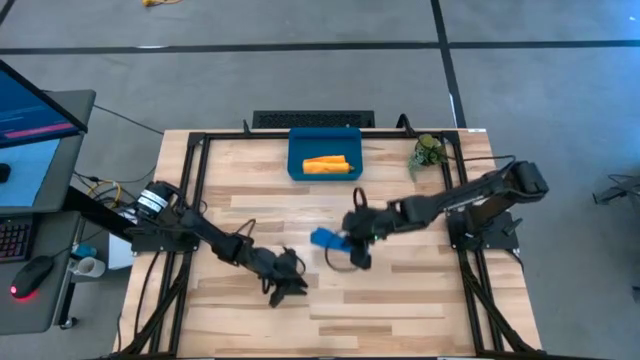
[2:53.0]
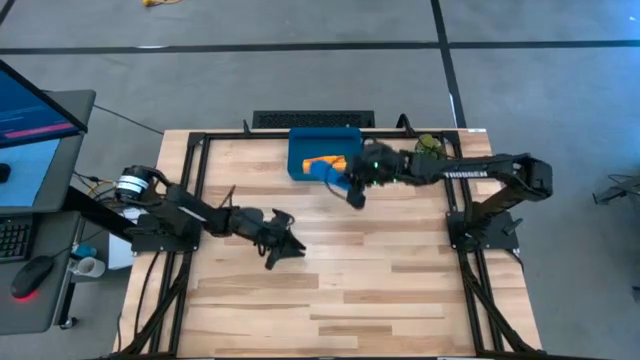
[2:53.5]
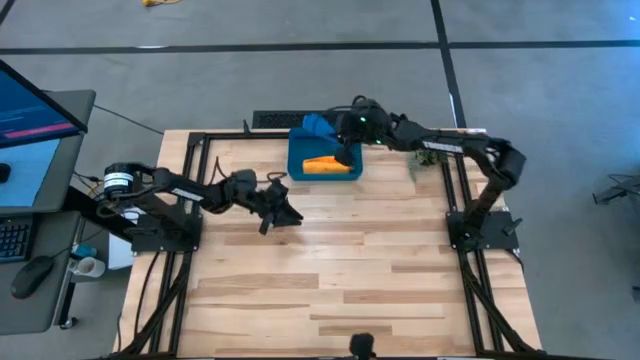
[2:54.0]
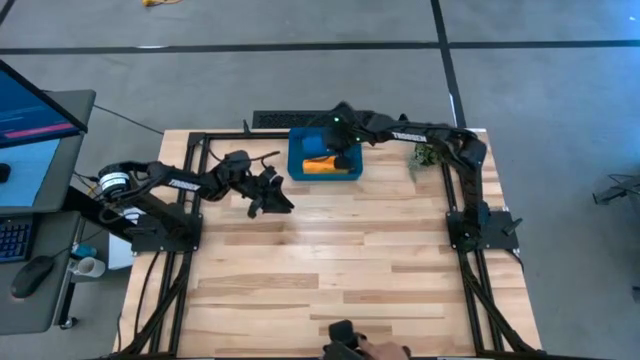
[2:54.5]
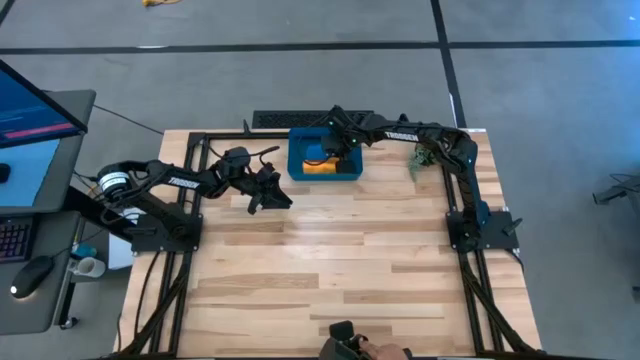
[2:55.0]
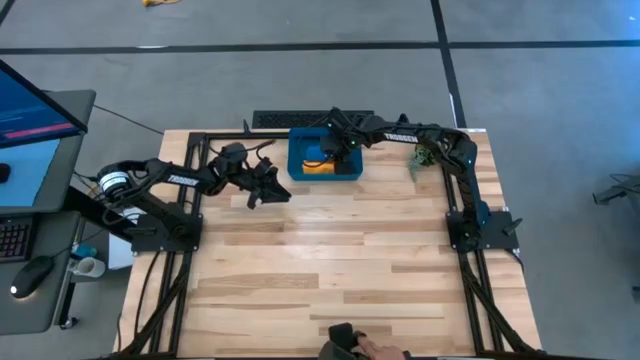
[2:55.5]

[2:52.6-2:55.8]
Task: Roll microfiber towels into tight, uniform cylinder then place into a basket
Put the blue microfiber cloth into the blue bin

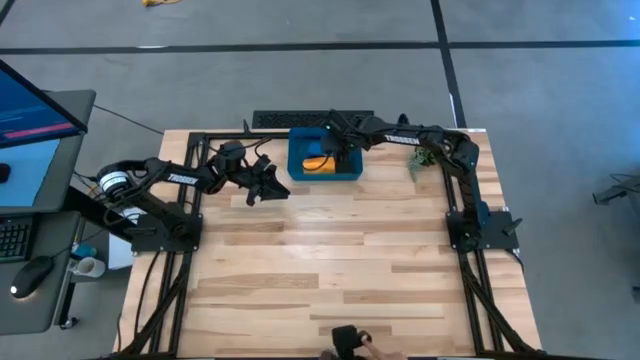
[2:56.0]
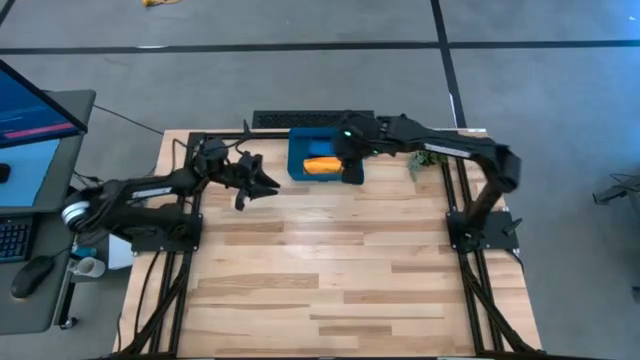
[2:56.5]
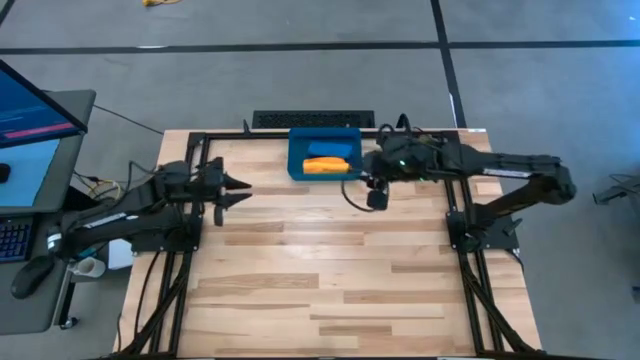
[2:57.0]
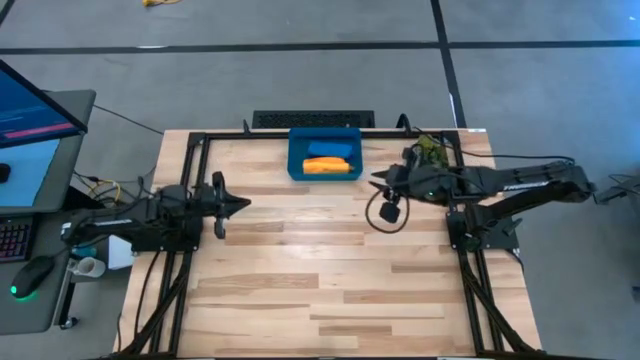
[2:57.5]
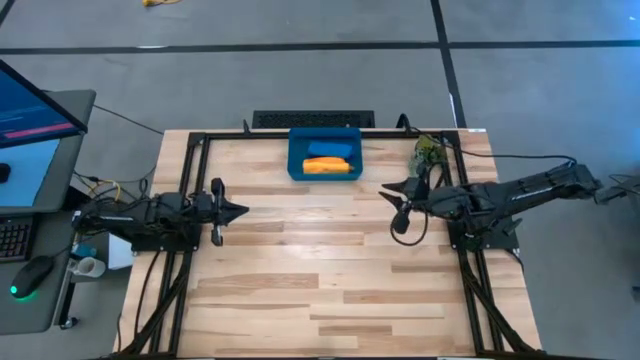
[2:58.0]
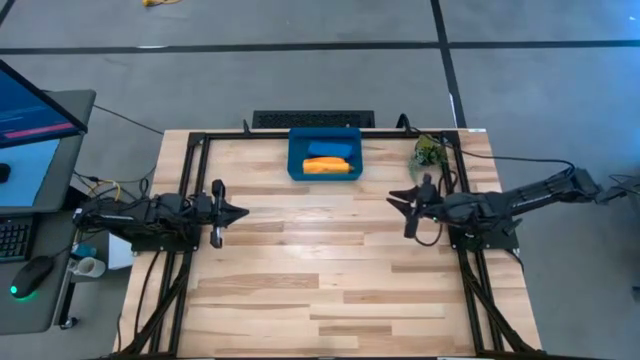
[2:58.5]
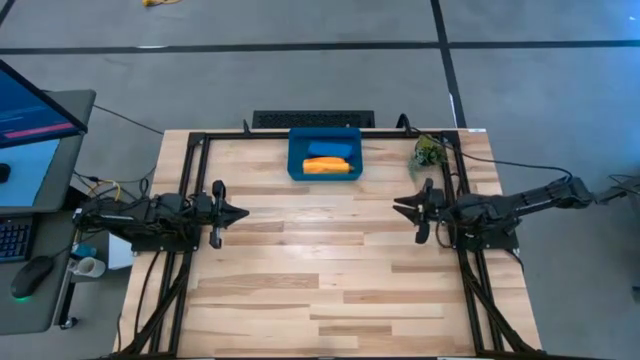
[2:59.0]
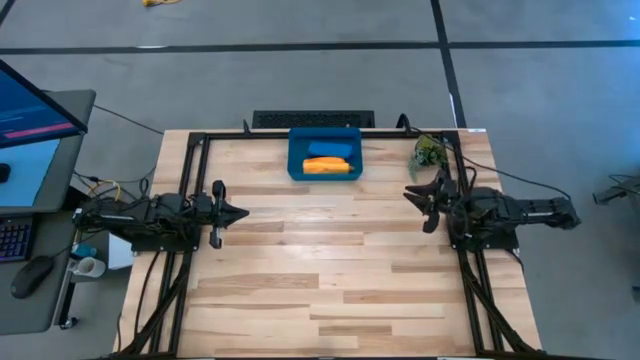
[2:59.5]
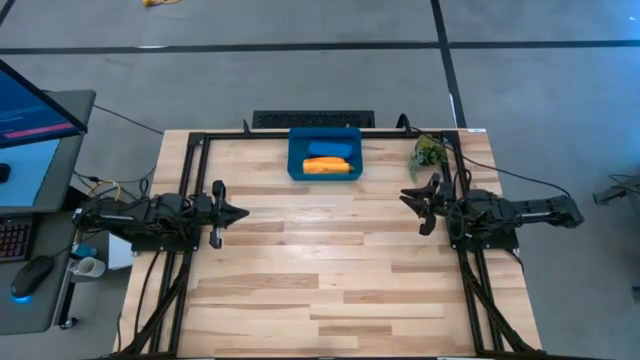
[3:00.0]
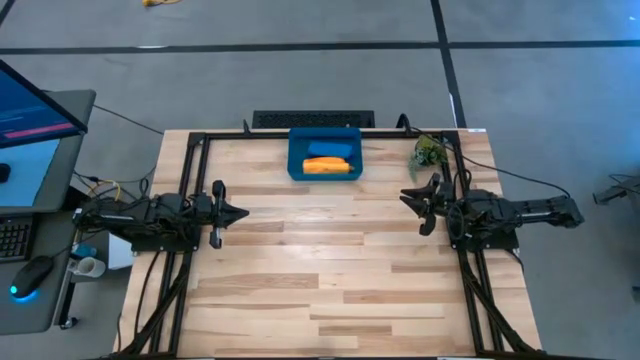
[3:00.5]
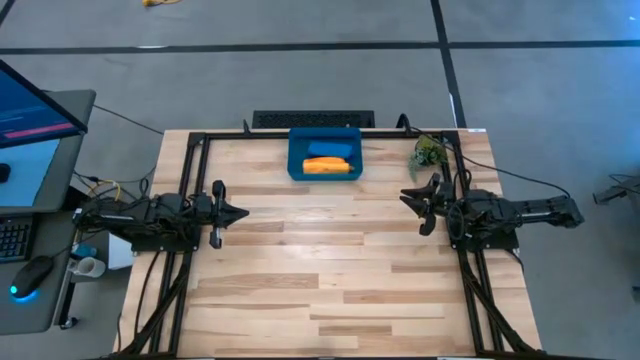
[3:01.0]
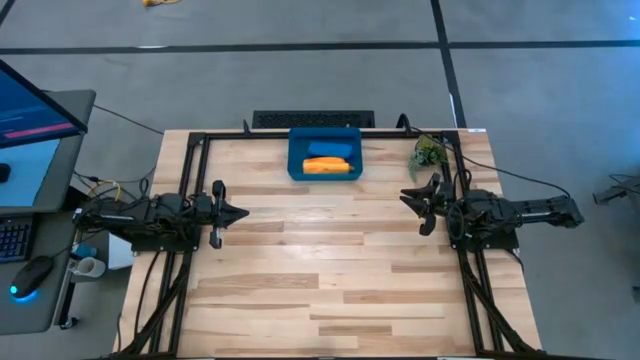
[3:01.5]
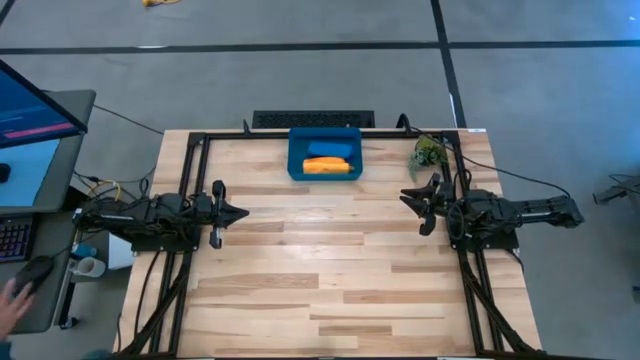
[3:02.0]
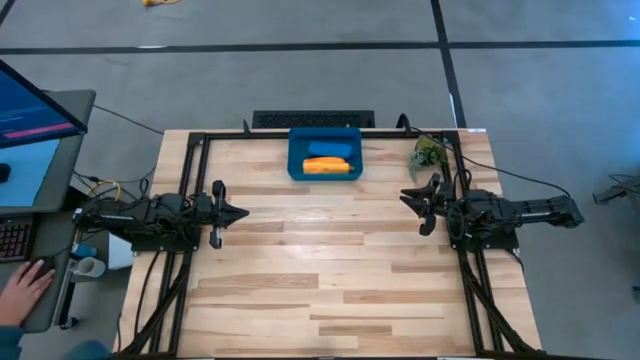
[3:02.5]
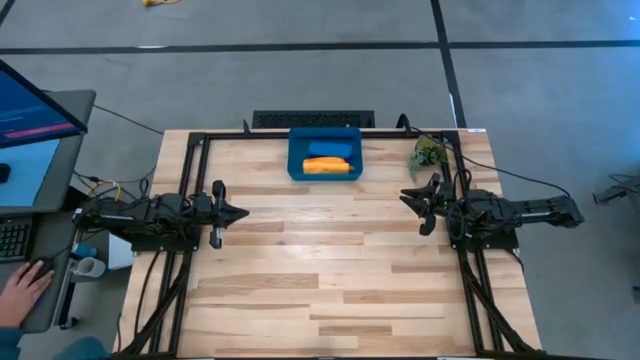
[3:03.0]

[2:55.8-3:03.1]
Return to Home Position

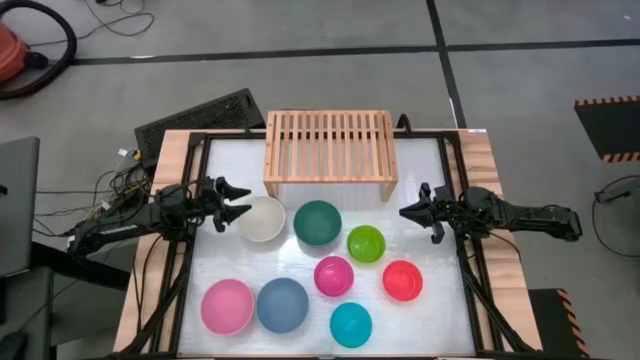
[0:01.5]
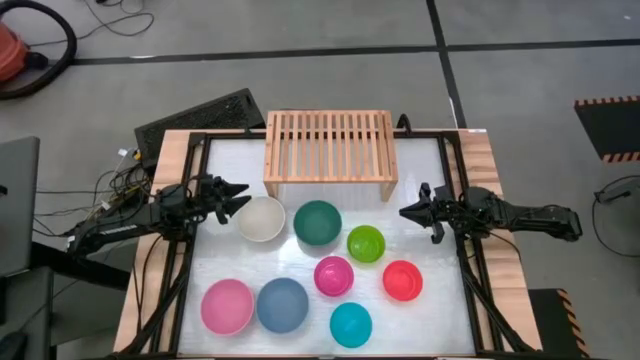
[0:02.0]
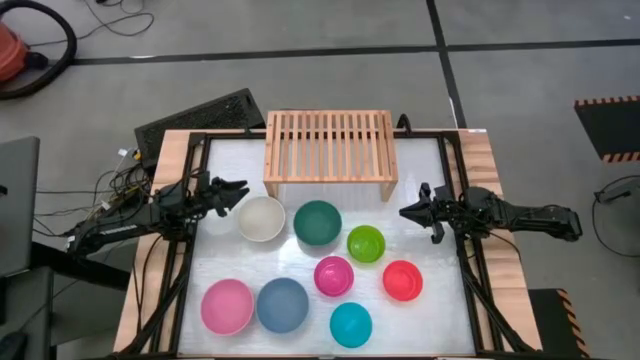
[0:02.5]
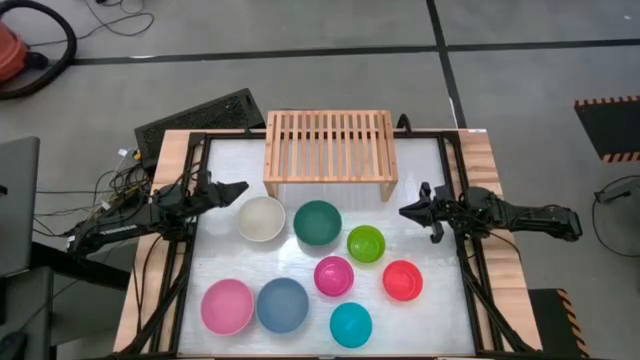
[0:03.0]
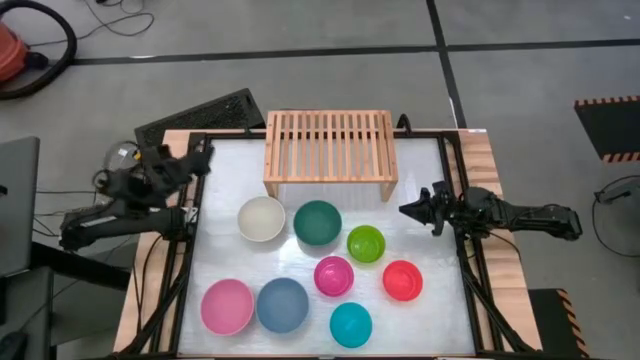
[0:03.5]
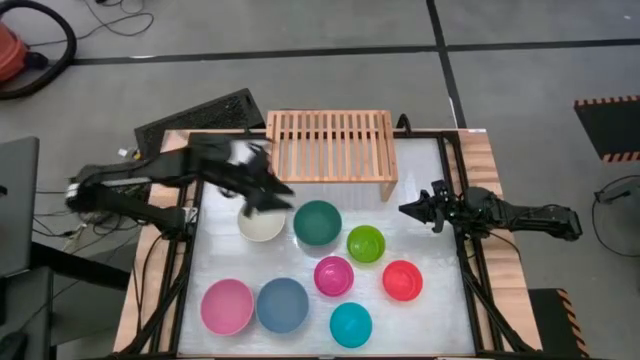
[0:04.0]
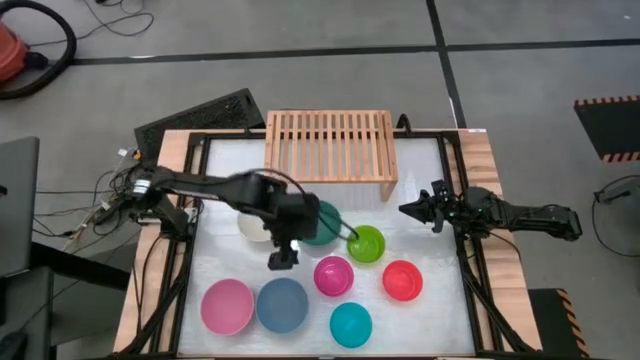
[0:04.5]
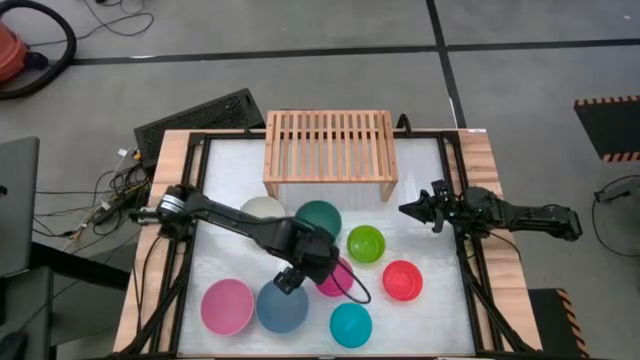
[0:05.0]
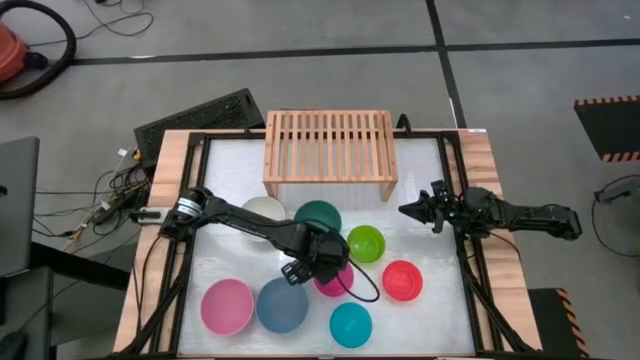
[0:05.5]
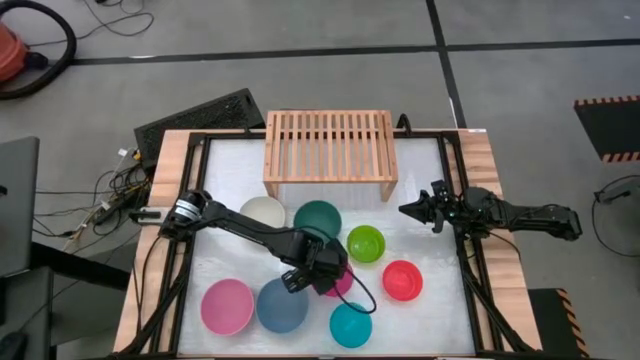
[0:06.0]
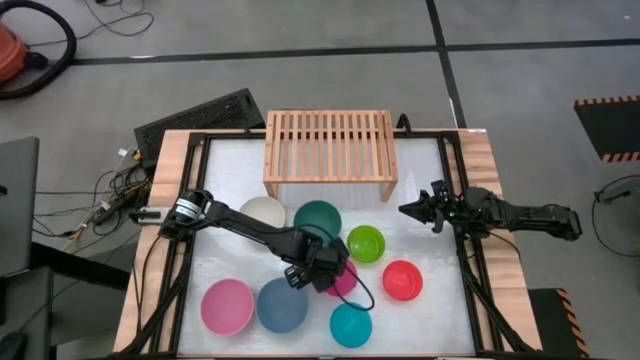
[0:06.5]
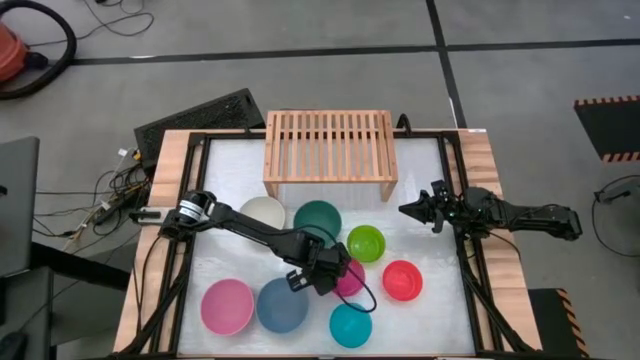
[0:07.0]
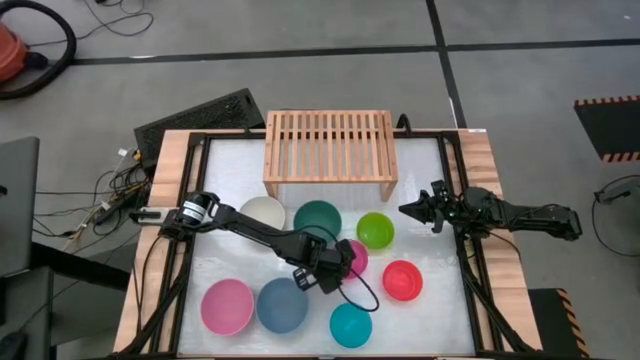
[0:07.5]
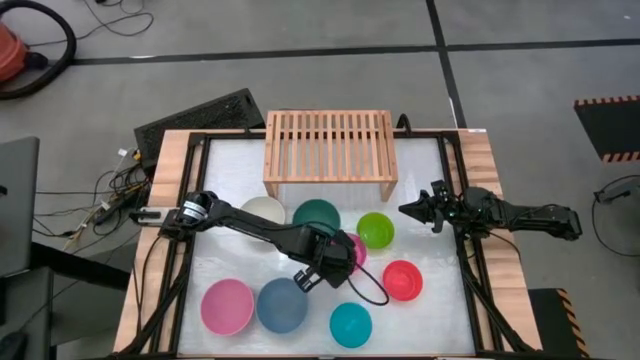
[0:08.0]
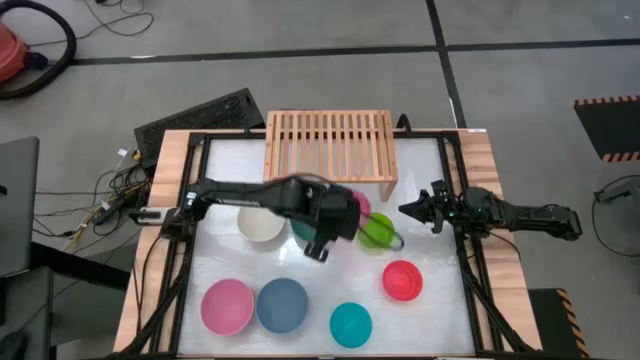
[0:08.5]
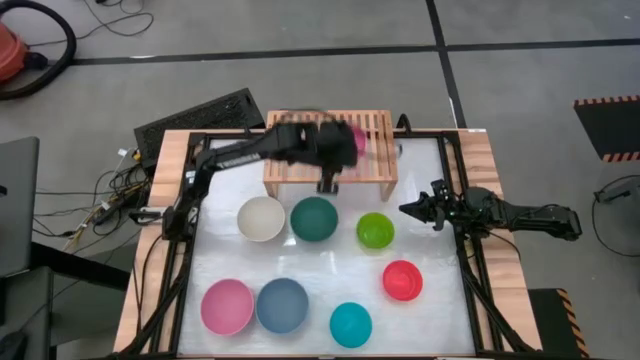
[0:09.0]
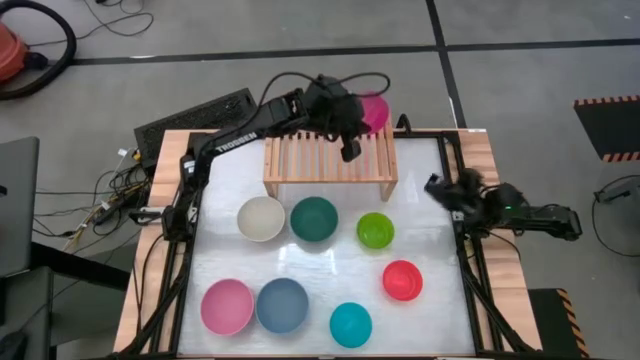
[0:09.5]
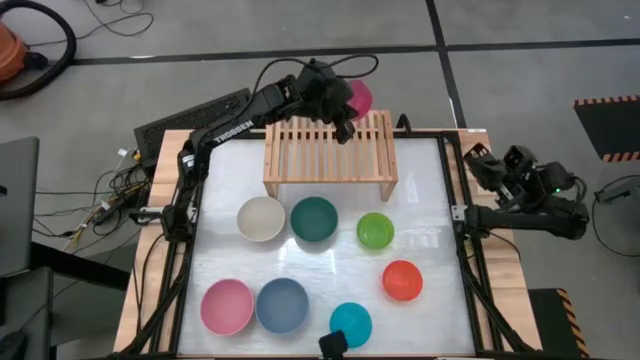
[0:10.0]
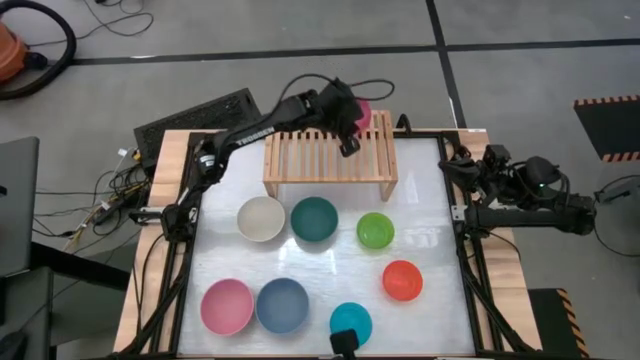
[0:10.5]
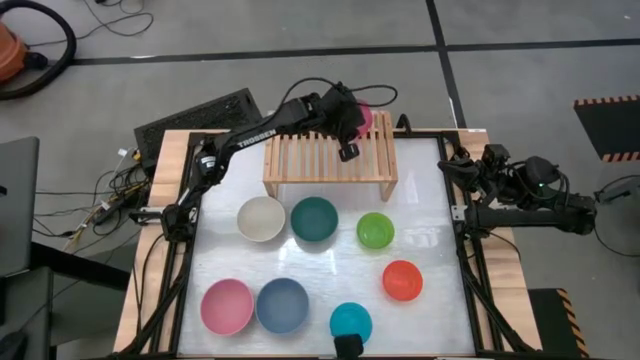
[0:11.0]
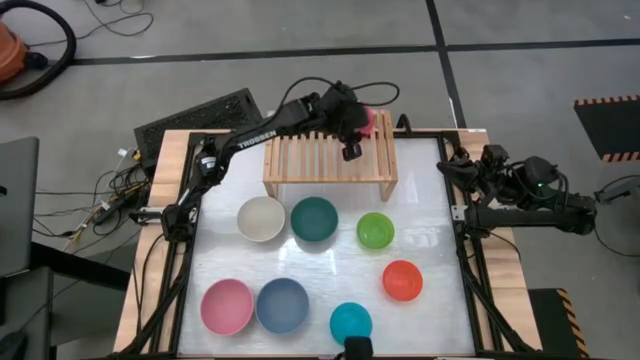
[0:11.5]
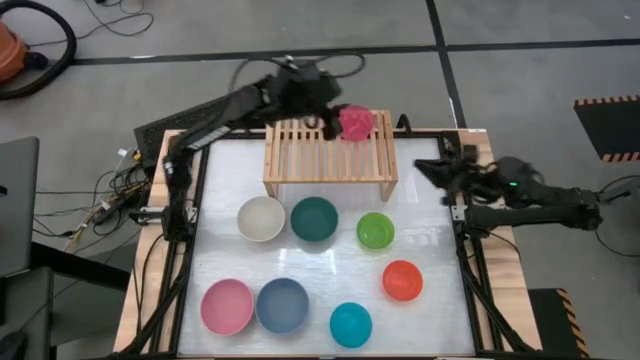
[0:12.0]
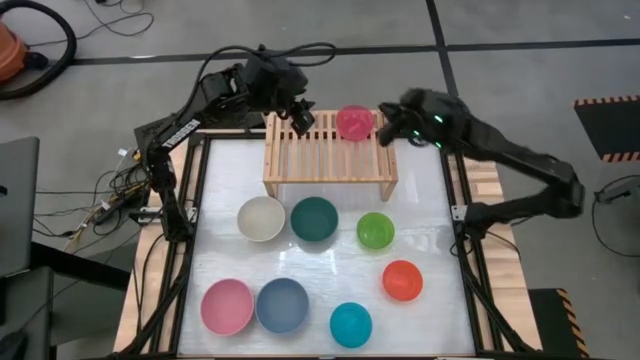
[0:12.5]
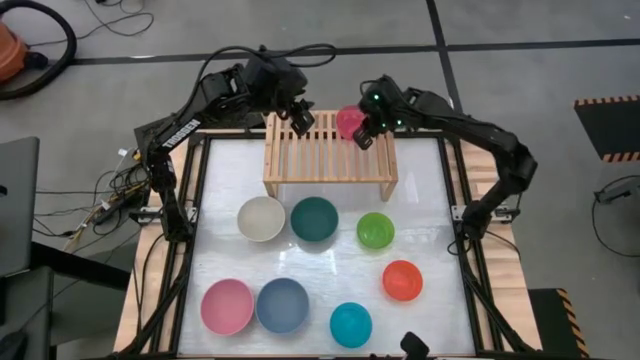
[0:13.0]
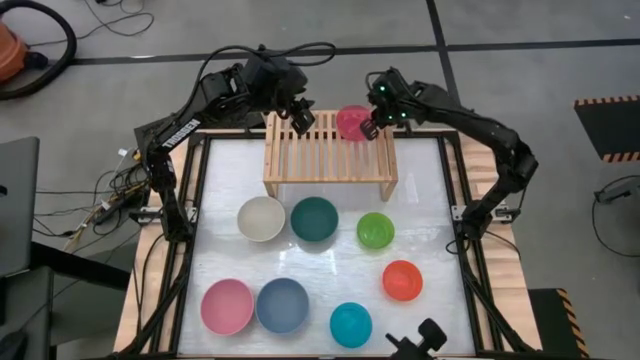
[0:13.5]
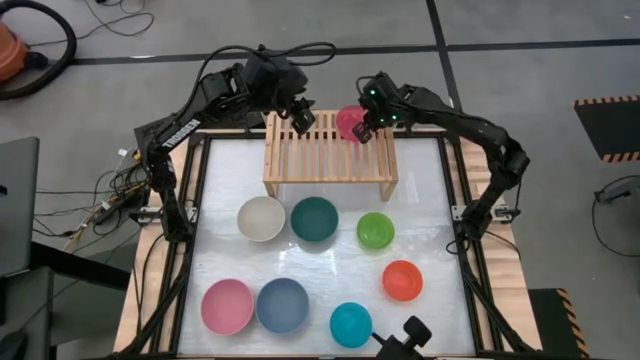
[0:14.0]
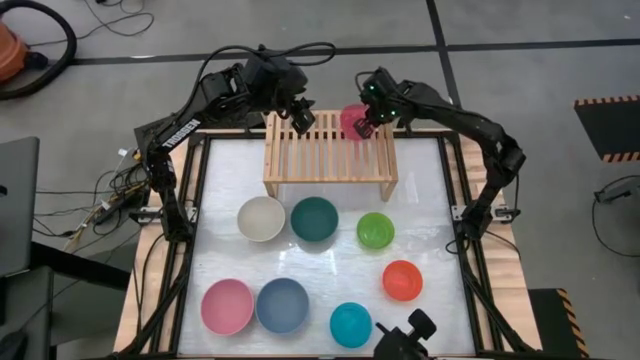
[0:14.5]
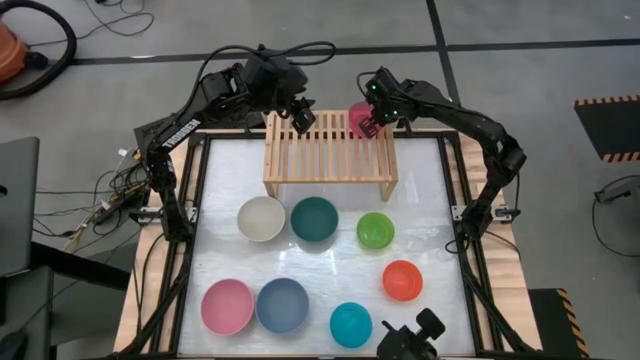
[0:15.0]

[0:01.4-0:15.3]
Task: Place and stack bowls onto a shelf
Put the right small pink bowl on the shelf
